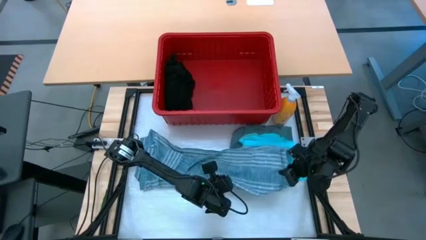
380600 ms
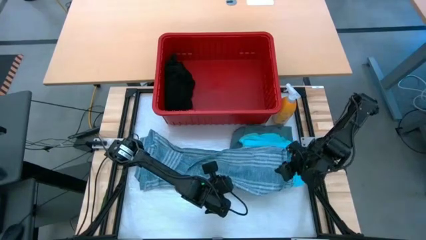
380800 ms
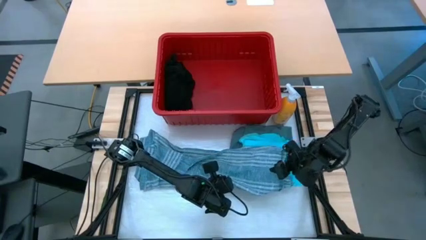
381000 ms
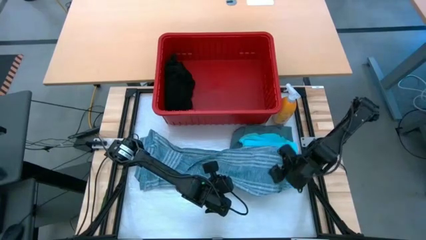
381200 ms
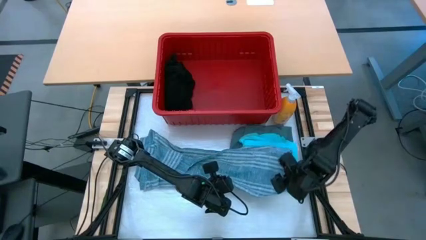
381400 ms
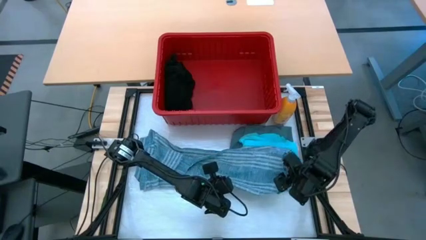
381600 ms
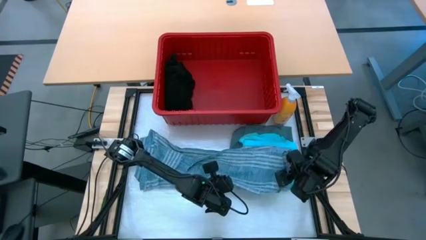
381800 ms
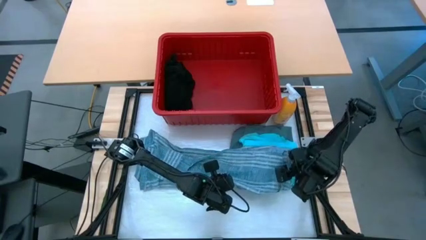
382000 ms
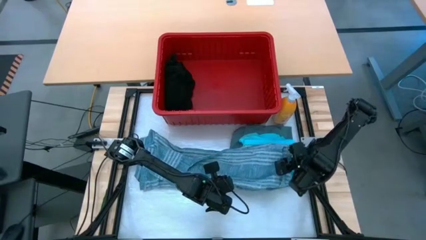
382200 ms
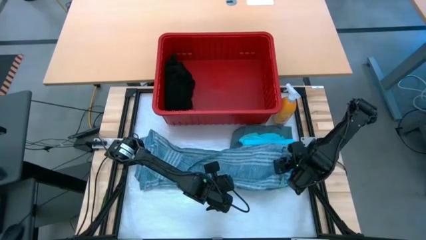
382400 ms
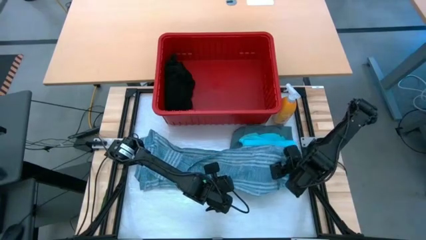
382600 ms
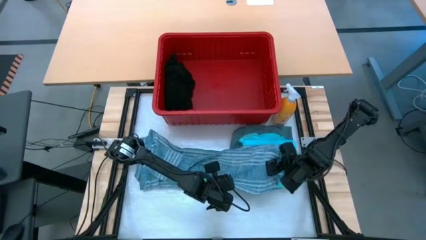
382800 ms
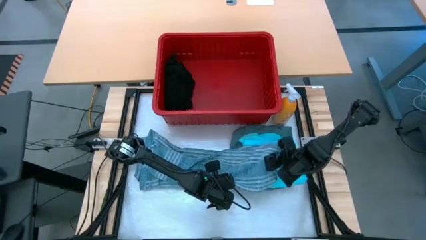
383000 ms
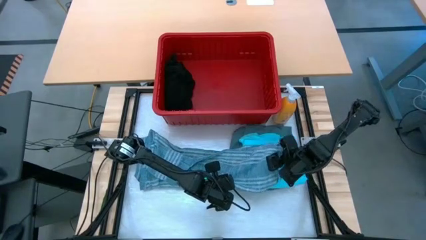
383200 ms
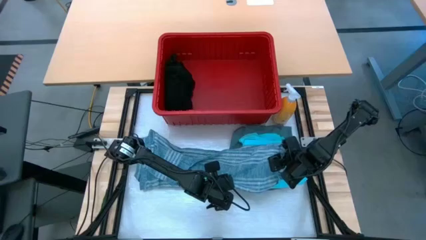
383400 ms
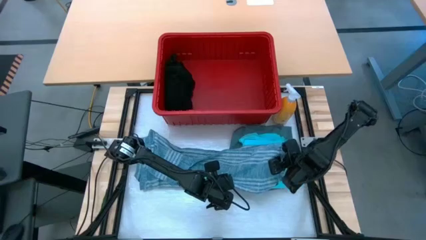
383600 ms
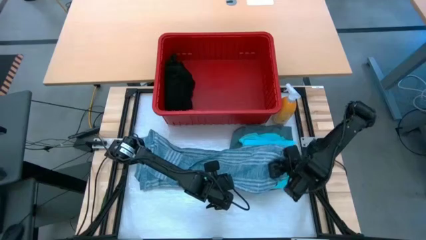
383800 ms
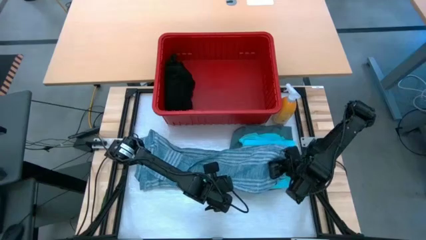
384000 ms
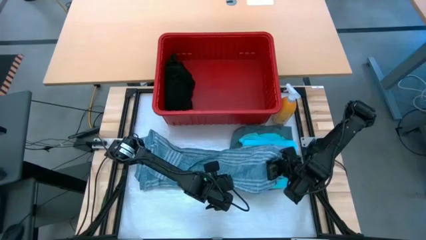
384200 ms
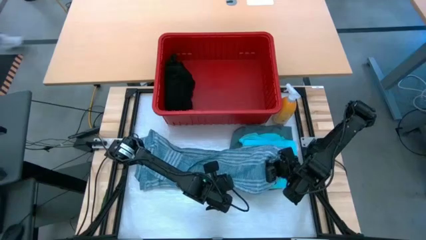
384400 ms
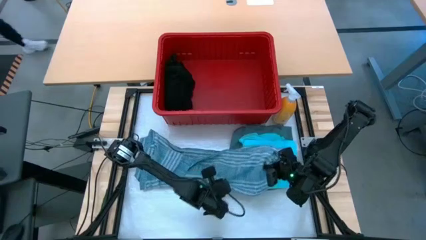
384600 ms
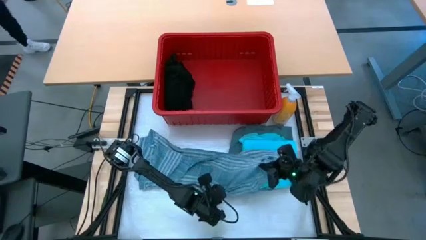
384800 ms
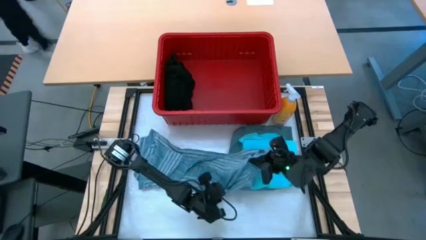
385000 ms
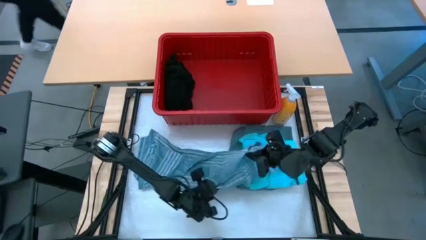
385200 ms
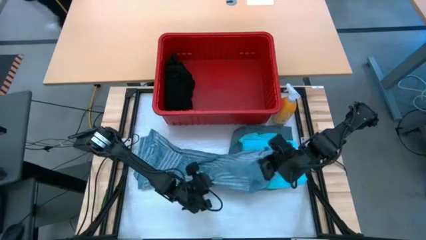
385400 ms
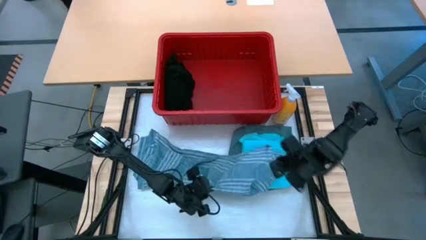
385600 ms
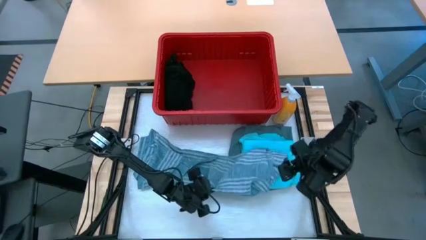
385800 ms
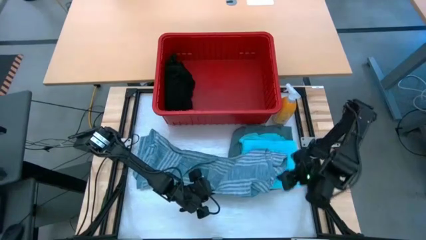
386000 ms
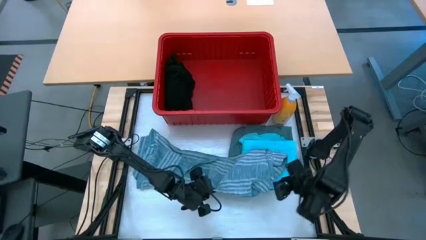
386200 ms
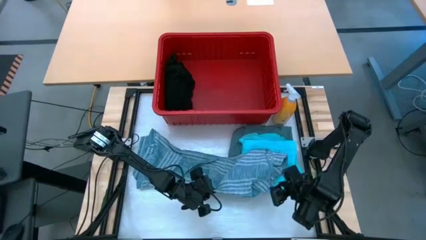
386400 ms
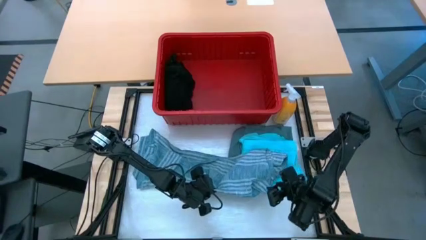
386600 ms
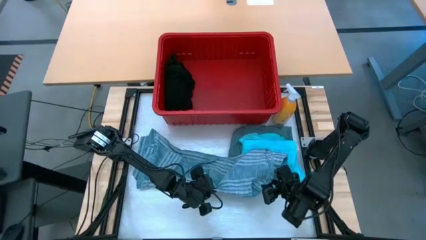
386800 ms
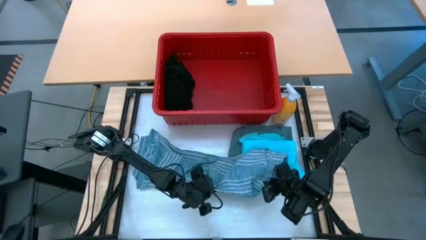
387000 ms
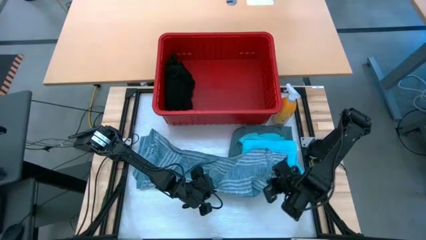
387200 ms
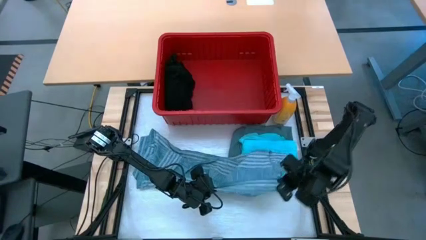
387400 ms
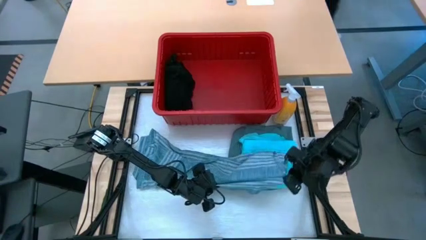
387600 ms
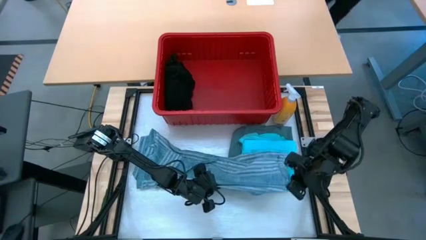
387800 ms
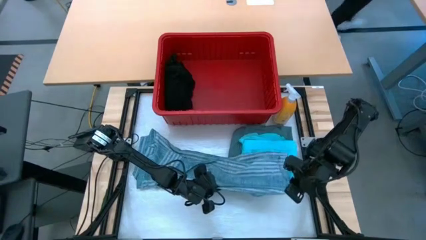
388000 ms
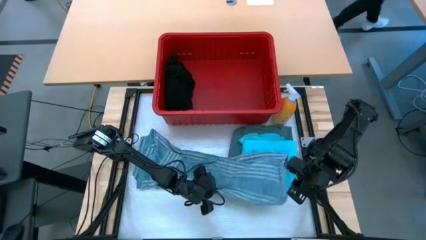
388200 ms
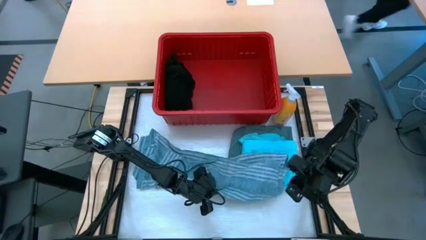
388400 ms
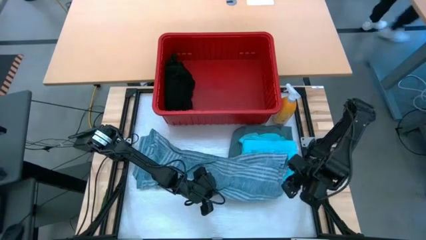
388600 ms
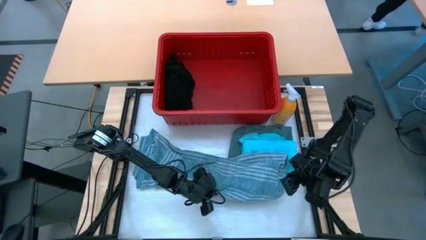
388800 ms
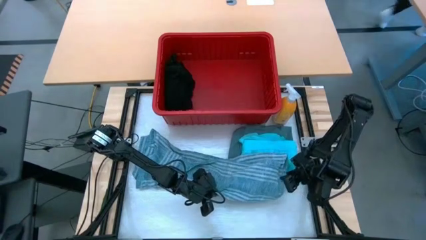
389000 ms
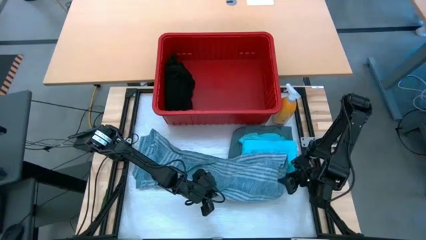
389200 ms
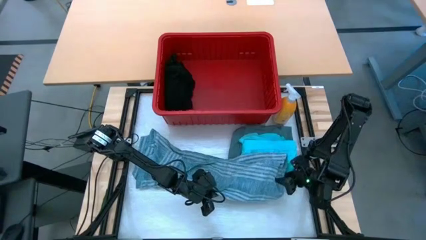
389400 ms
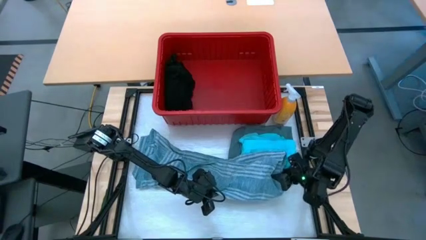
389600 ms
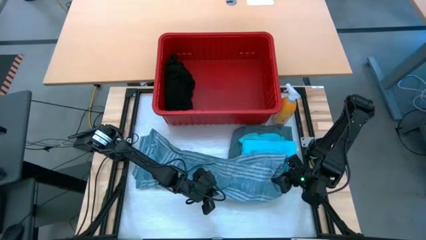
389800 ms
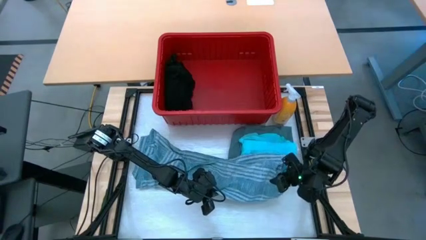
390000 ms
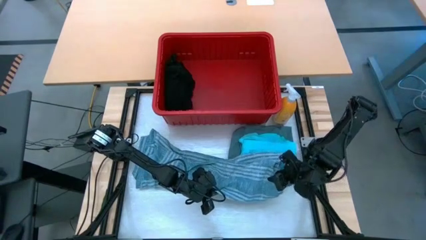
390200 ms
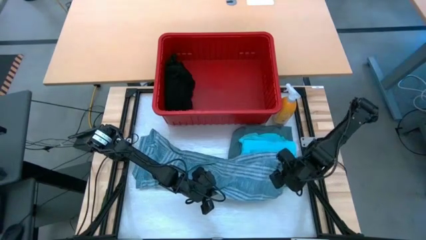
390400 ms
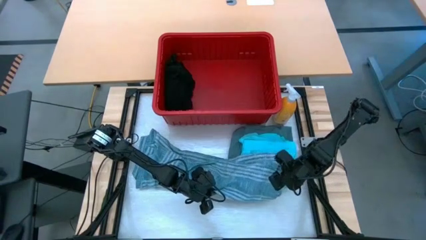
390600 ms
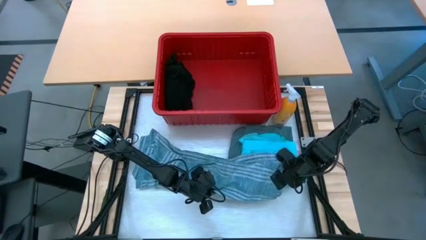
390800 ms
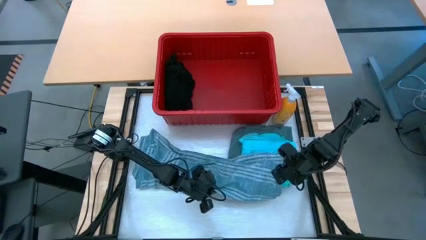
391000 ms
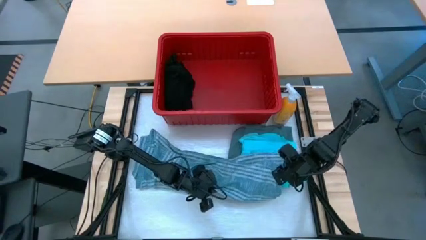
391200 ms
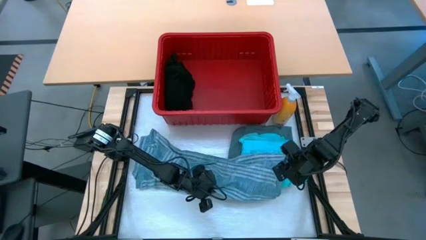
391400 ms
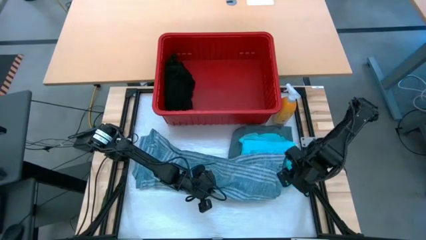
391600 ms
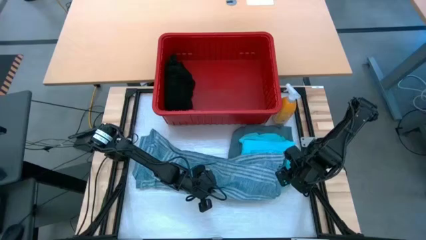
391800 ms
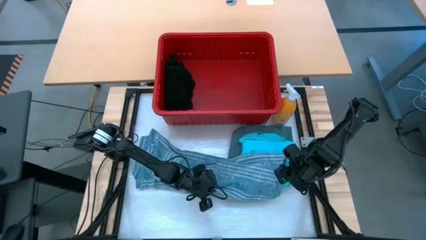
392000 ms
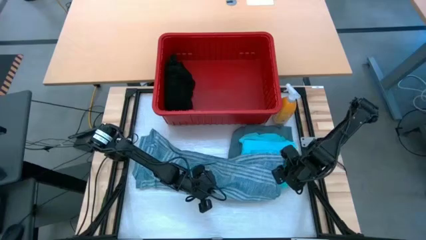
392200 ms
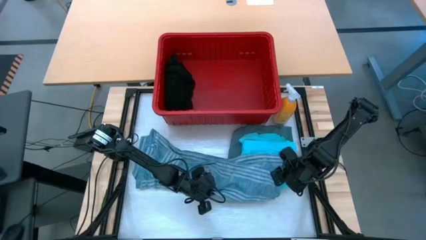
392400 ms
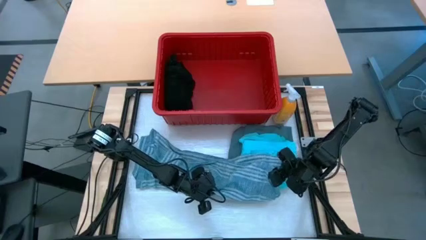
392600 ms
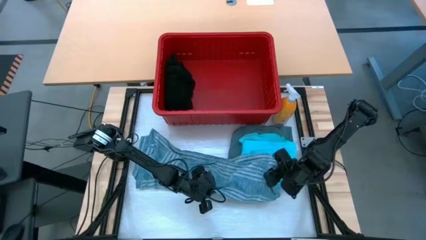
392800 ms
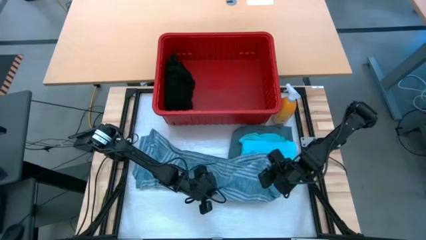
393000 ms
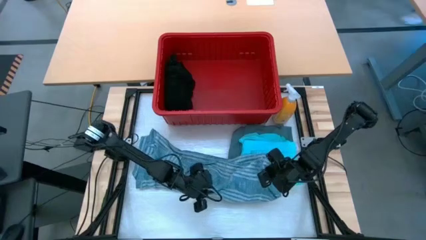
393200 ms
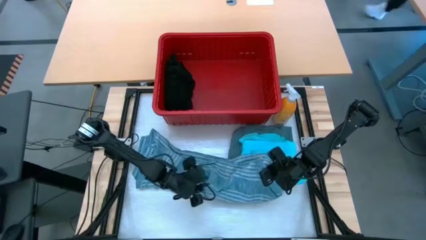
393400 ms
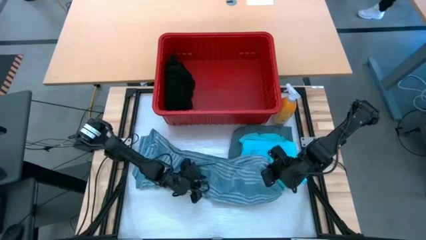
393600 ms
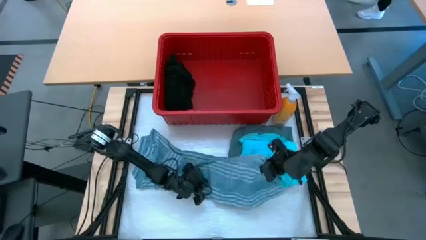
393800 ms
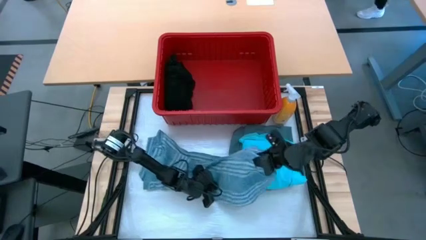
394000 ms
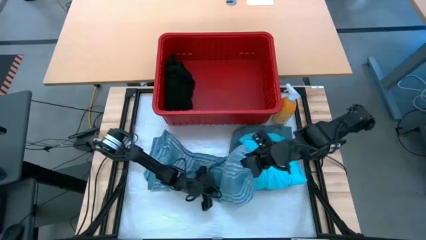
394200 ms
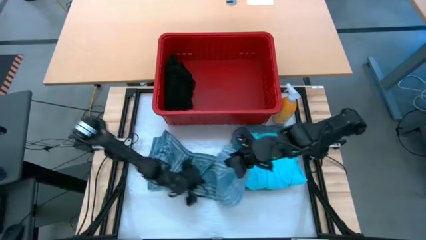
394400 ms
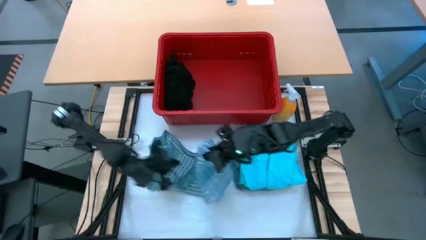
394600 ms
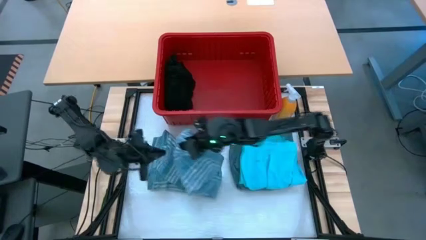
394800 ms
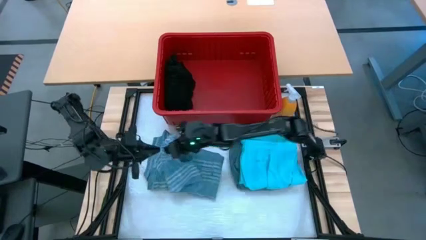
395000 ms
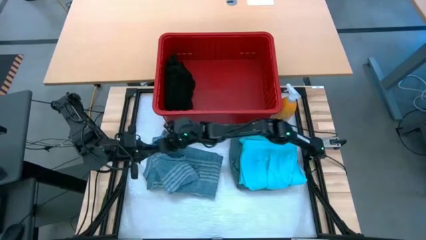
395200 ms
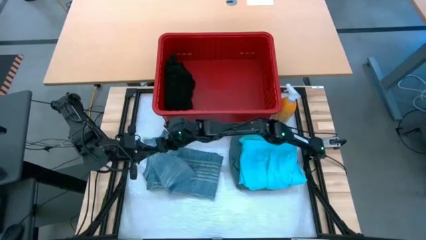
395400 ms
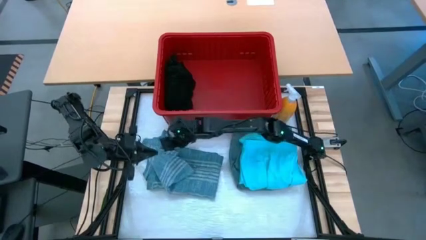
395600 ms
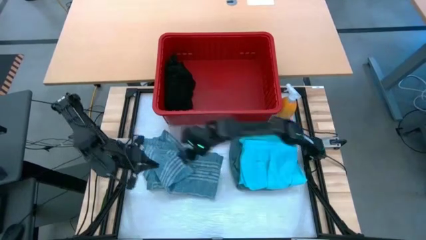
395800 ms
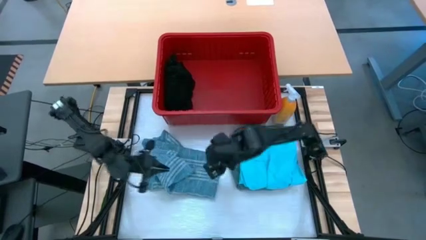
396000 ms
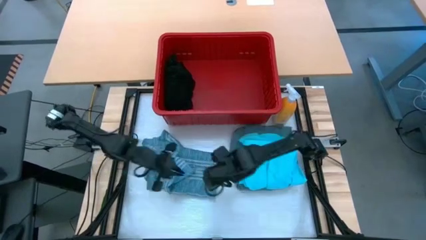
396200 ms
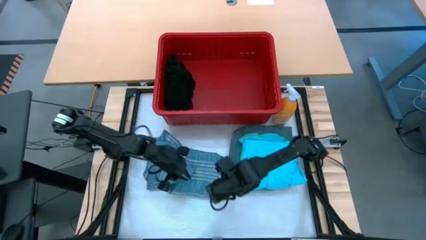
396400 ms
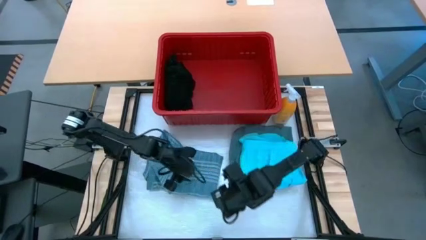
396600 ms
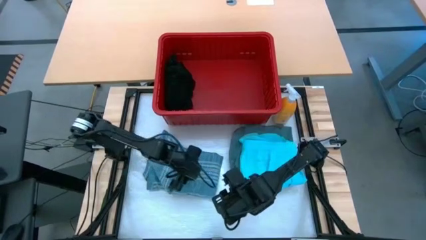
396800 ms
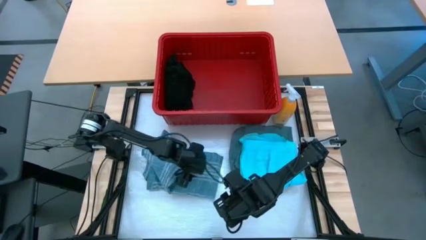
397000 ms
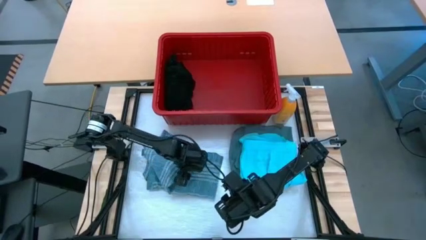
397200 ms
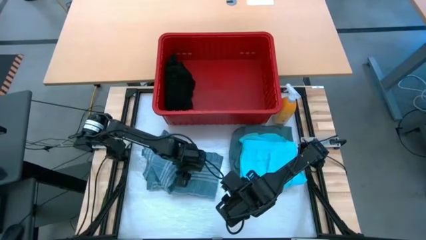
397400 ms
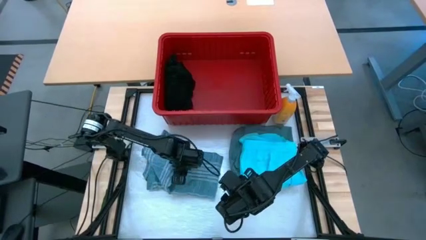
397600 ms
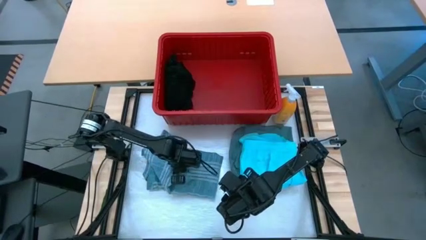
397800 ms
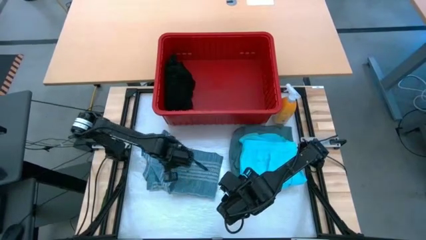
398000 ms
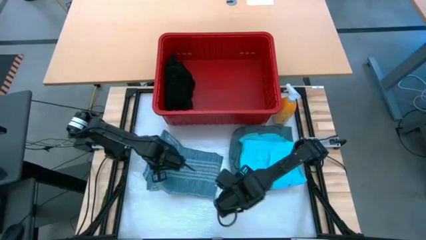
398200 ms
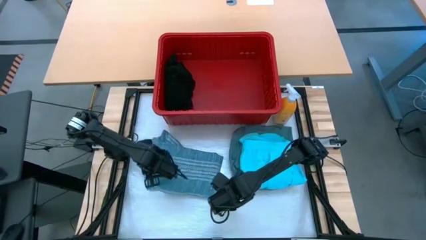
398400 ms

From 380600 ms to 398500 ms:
Task: Fold Laundry from Bin
Fold the blue shirt
